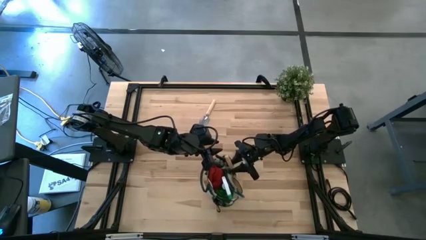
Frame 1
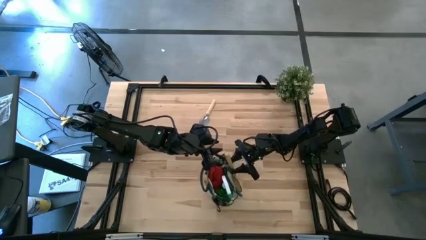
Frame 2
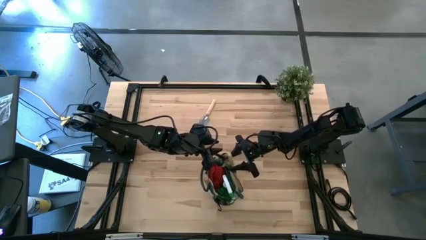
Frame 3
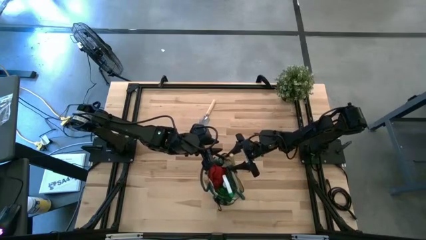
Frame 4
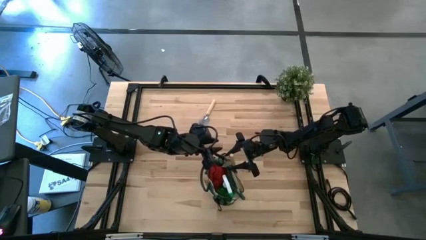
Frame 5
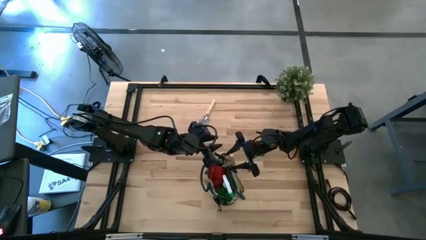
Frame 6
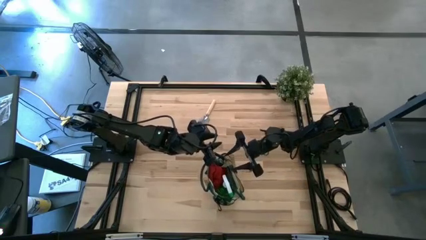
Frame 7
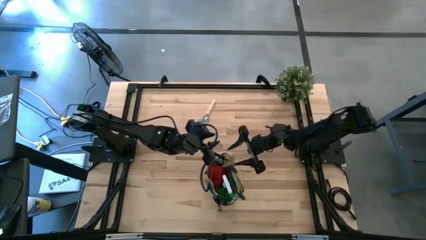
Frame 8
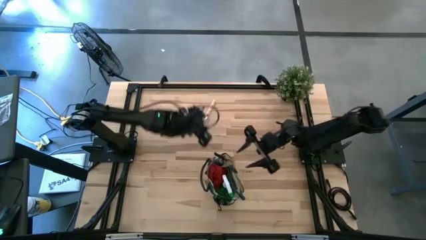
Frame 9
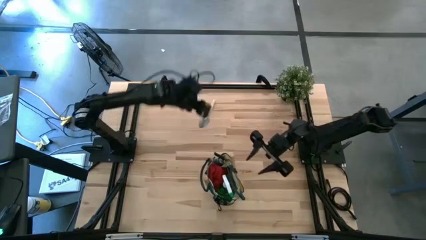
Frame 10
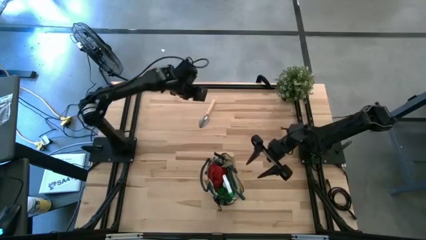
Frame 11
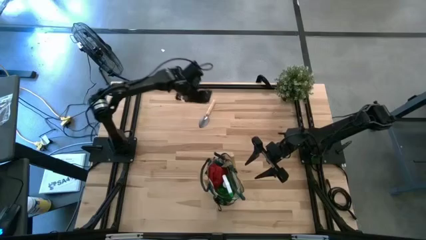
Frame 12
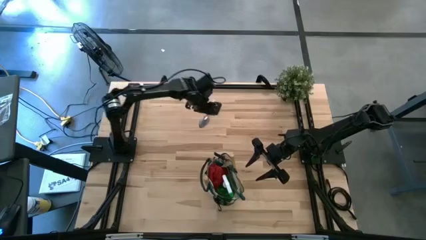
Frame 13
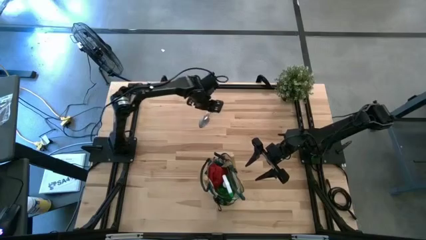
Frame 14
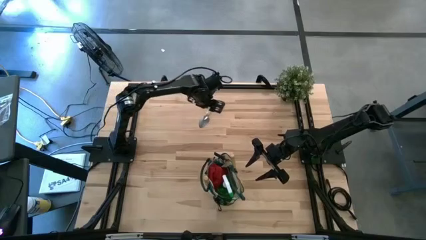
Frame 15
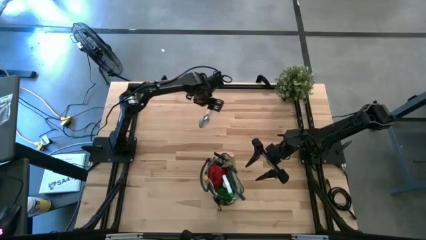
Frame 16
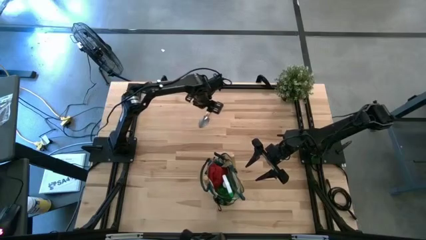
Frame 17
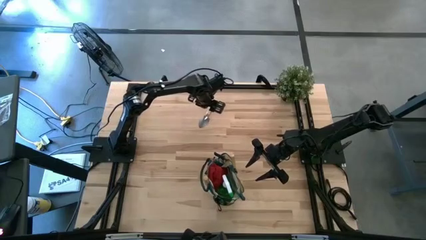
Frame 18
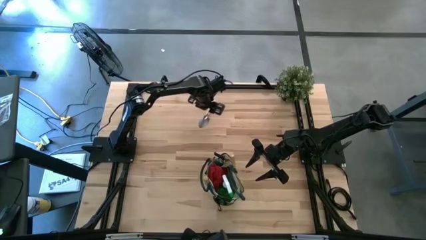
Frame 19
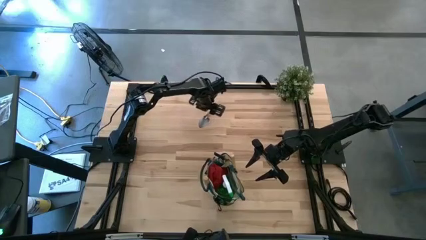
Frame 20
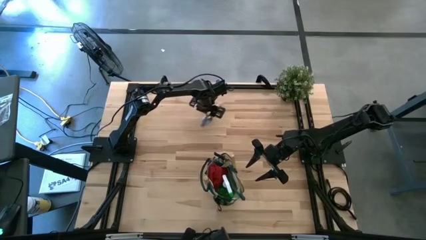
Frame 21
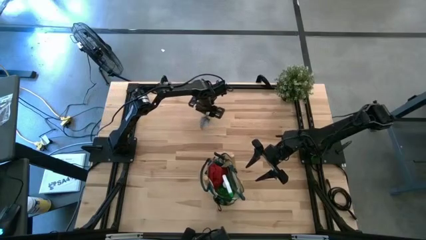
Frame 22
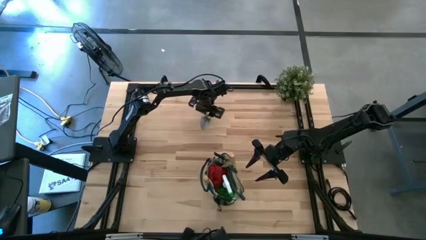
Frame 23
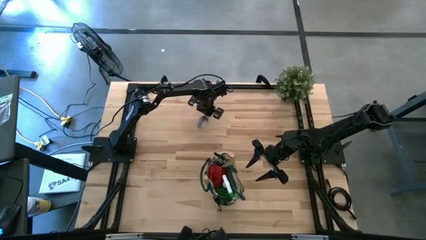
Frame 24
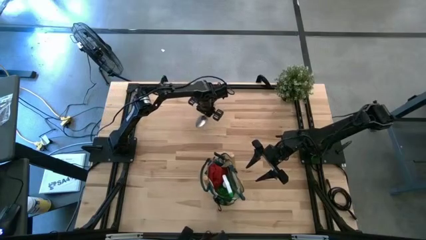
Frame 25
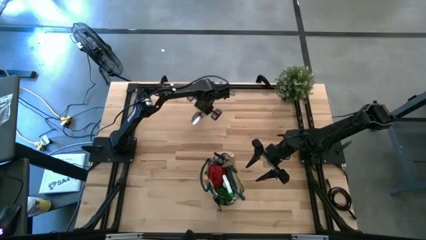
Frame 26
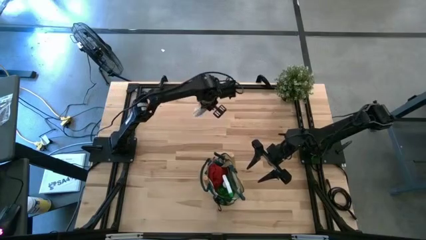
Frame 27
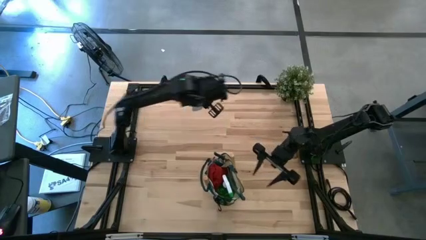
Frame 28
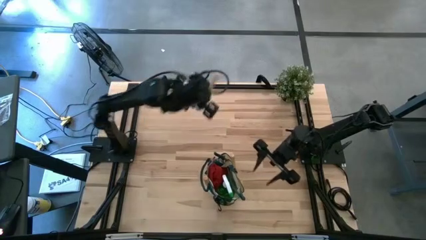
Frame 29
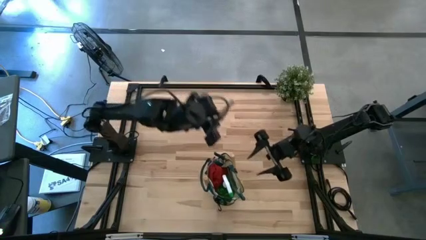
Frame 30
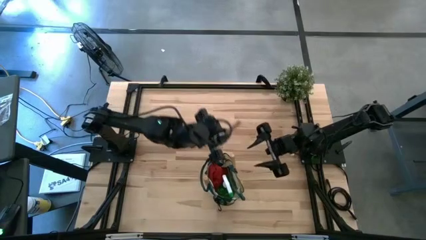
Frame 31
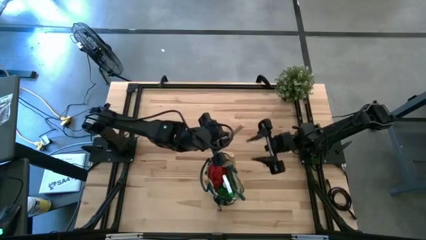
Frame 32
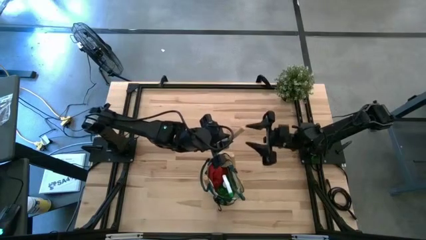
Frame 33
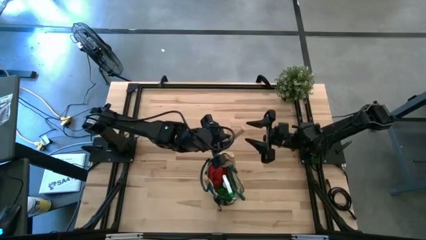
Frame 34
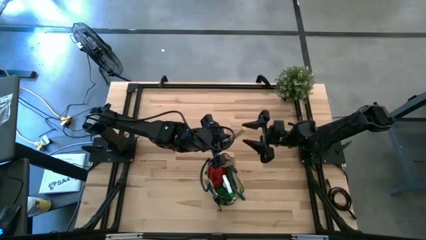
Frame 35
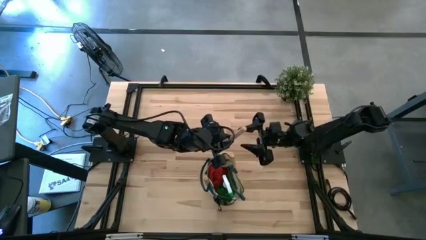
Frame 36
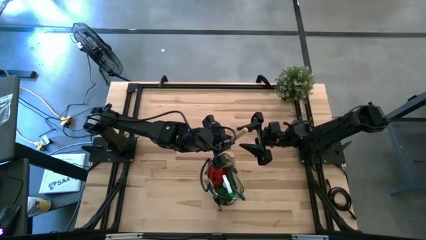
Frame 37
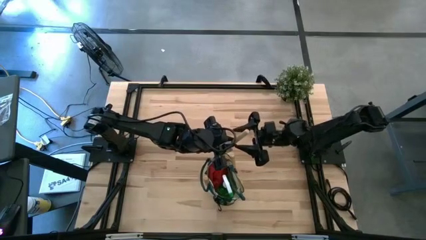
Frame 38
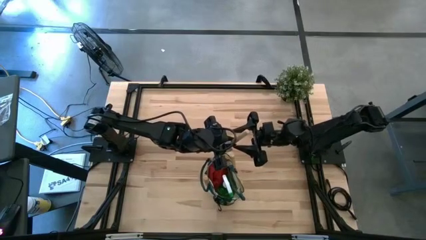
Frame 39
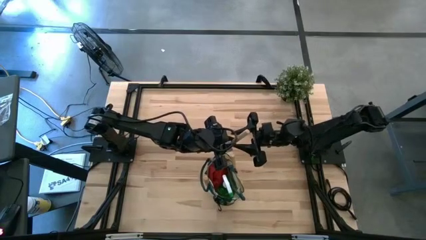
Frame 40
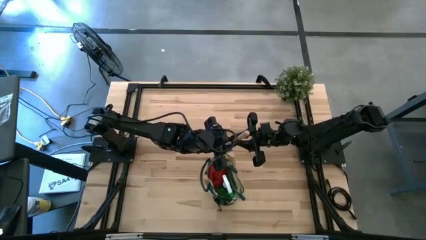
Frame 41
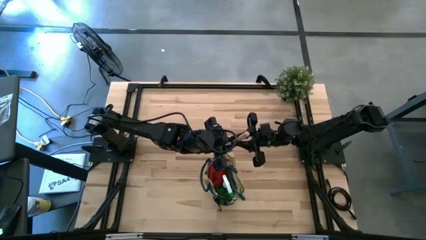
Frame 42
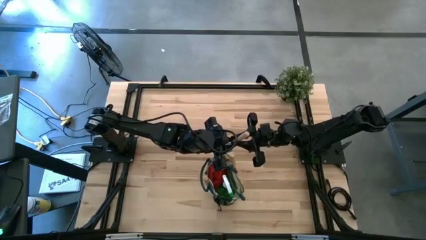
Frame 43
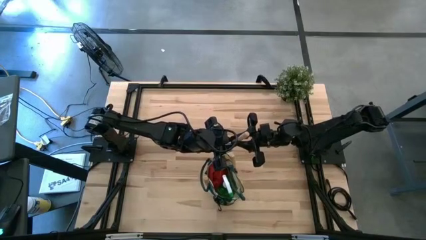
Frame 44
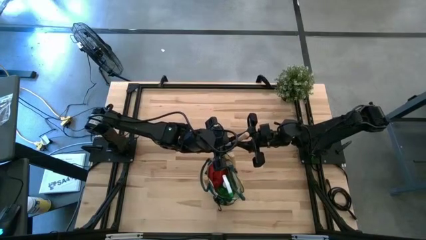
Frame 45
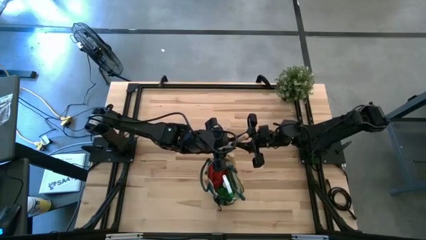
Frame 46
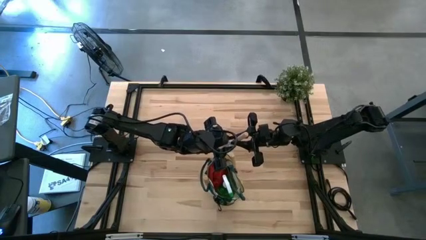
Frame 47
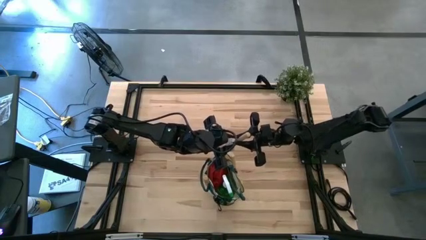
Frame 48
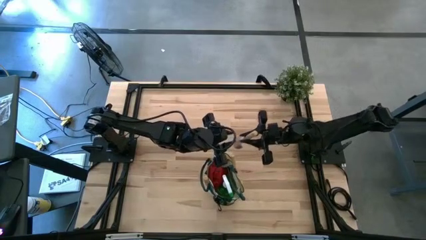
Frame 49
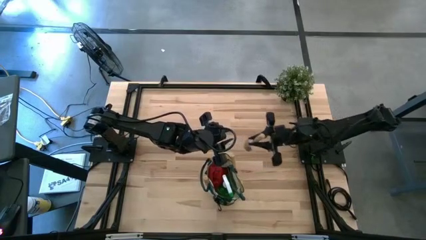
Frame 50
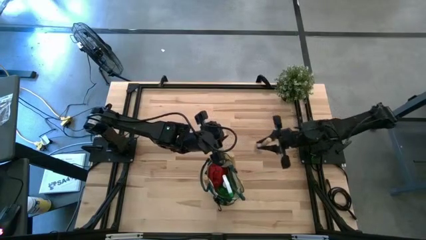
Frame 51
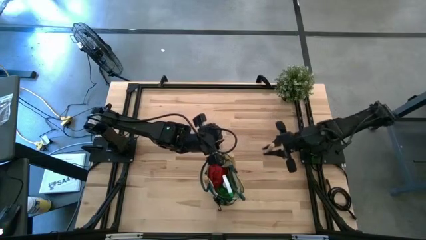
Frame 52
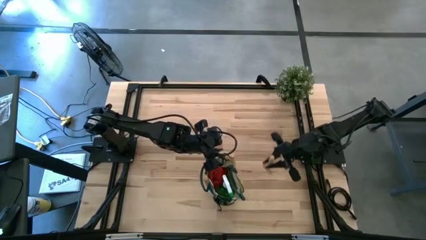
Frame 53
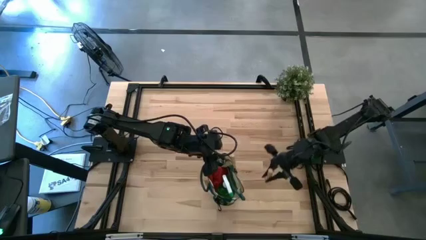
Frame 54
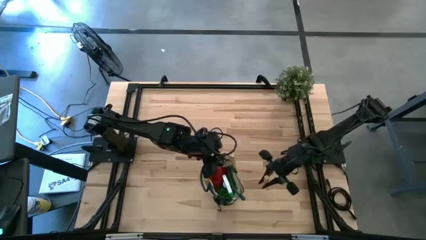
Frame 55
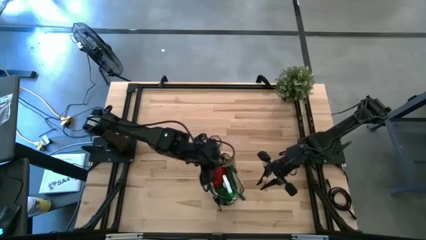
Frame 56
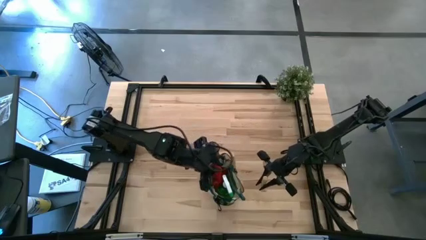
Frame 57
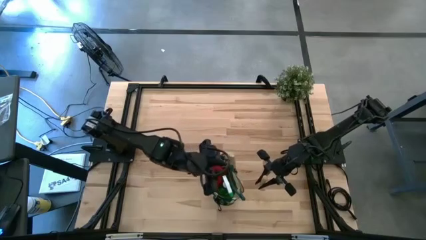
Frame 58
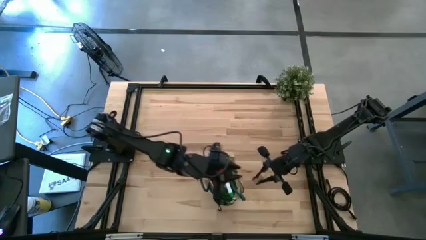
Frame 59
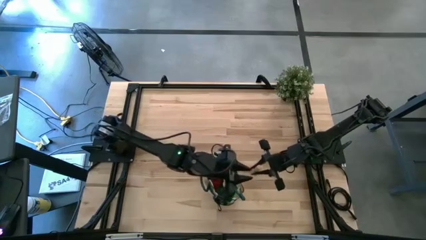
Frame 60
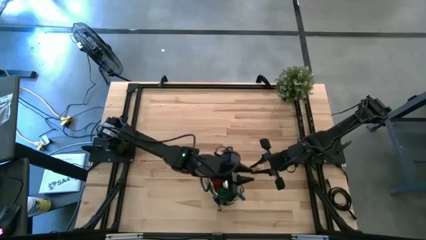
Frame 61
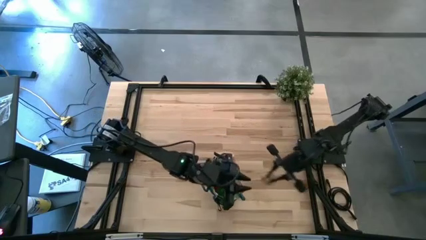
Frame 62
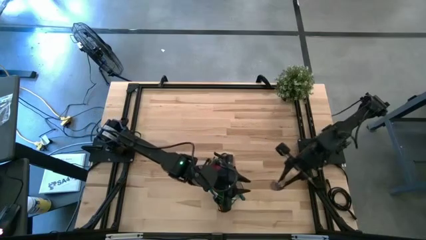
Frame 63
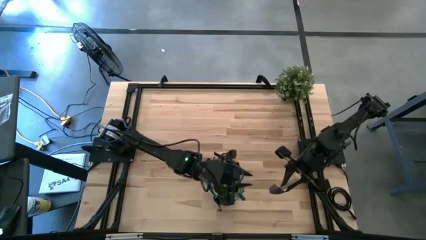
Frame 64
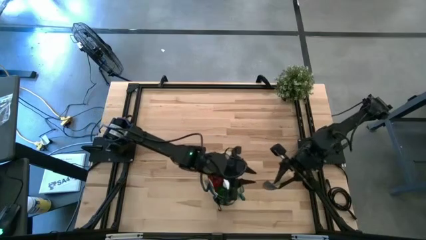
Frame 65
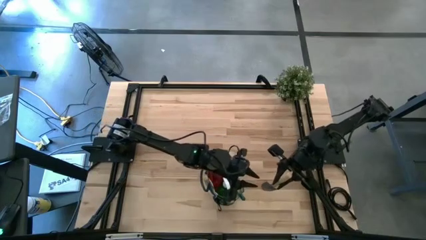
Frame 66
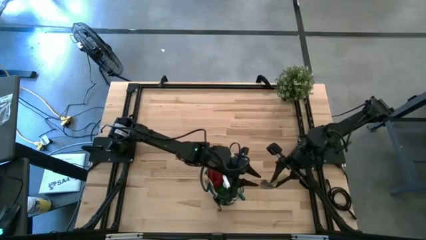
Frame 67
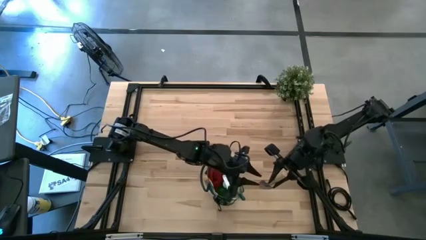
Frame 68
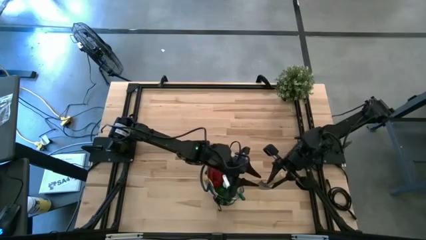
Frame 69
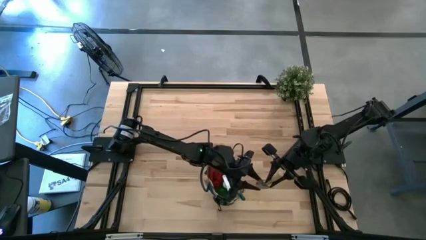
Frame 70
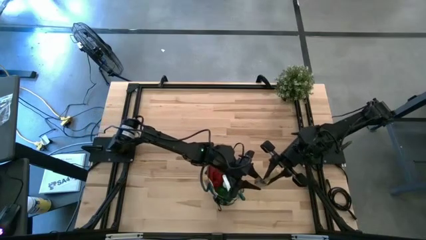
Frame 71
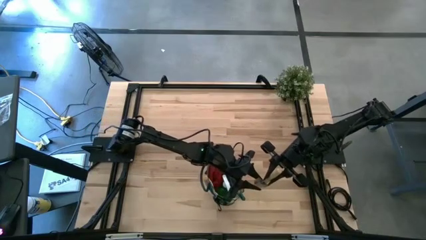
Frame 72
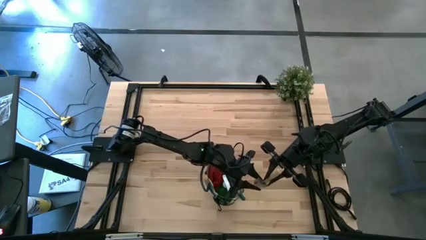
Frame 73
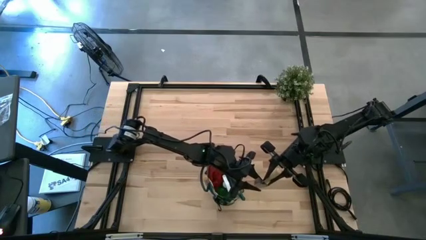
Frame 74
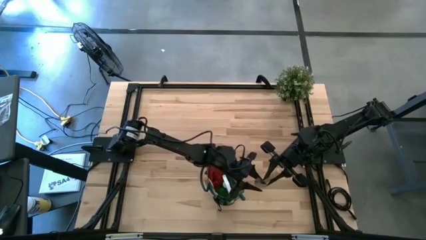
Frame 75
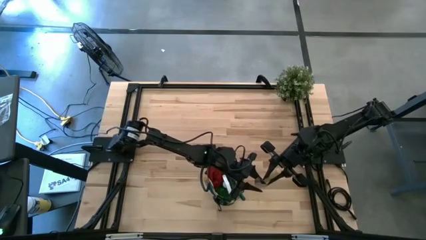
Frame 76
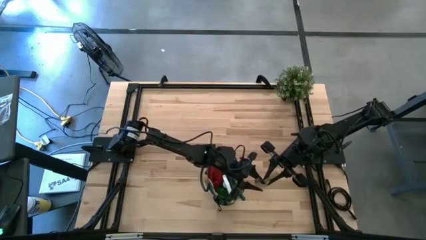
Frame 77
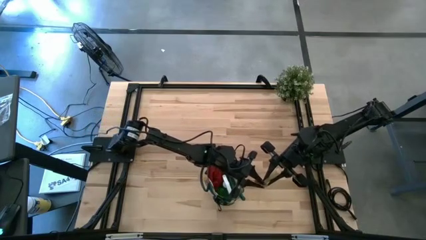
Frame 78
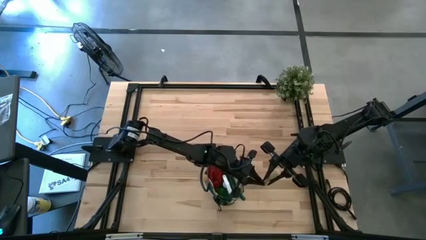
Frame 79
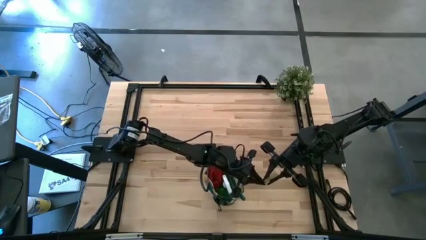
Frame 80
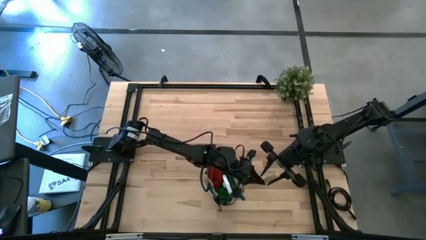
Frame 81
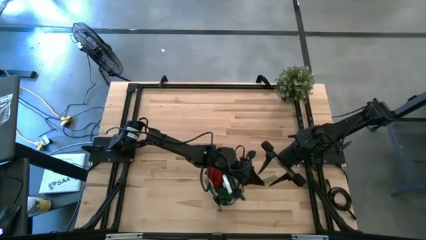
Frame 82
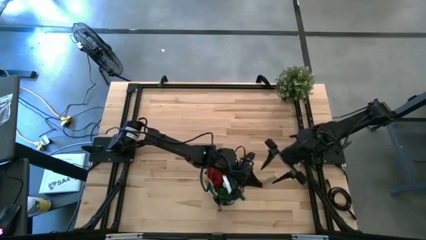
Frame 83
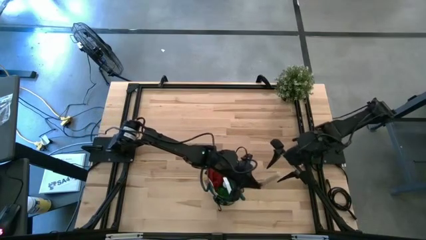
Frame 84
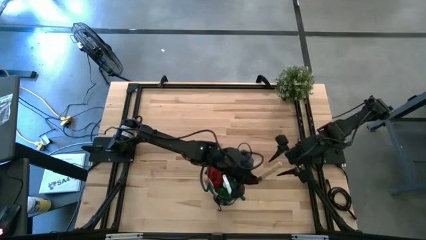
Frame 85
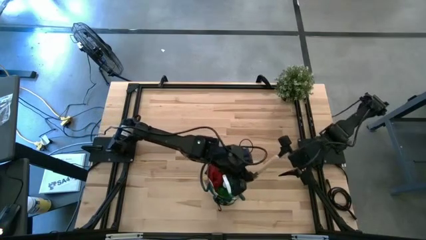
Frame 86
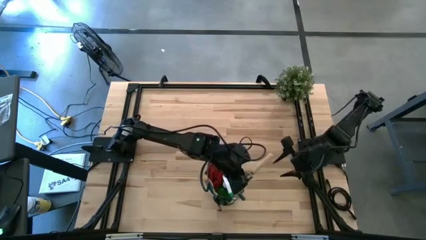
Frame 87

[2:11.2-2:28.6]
Task: Pick & Place Garden tools in Gardening bag
Put the trowel into the gardening bag
